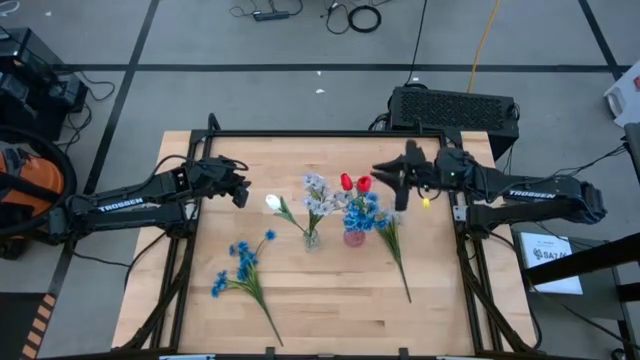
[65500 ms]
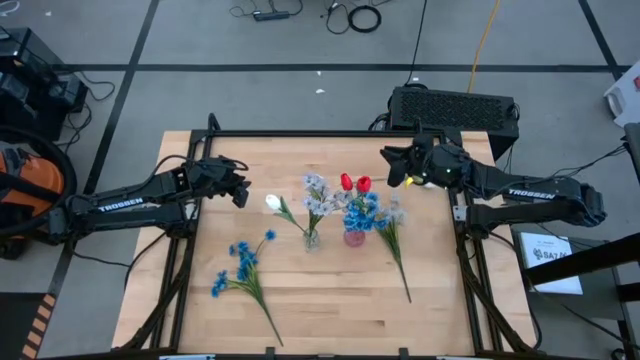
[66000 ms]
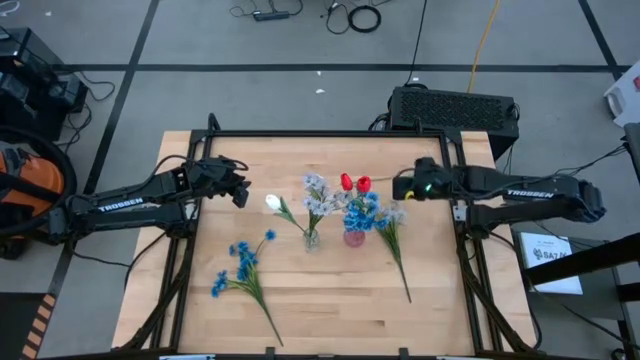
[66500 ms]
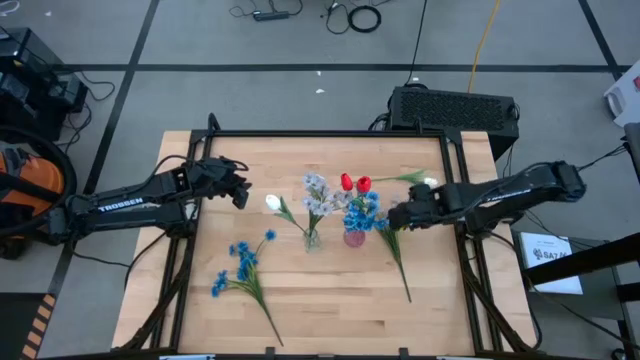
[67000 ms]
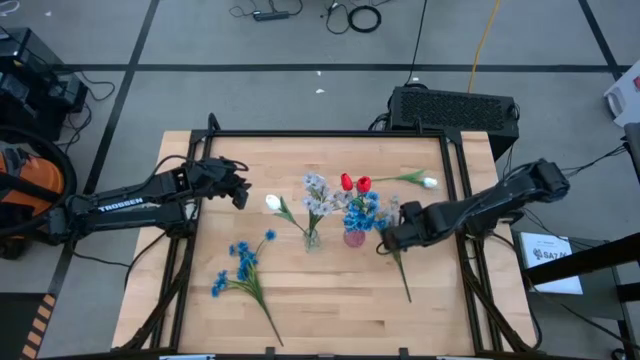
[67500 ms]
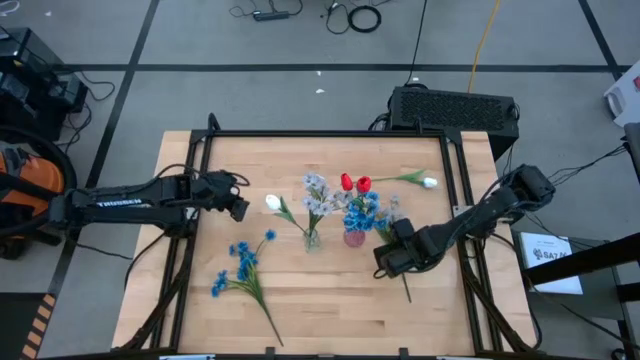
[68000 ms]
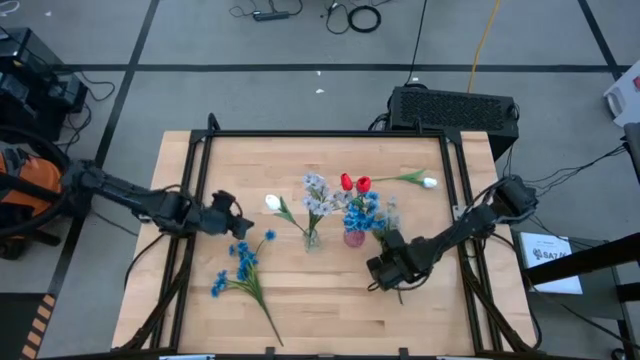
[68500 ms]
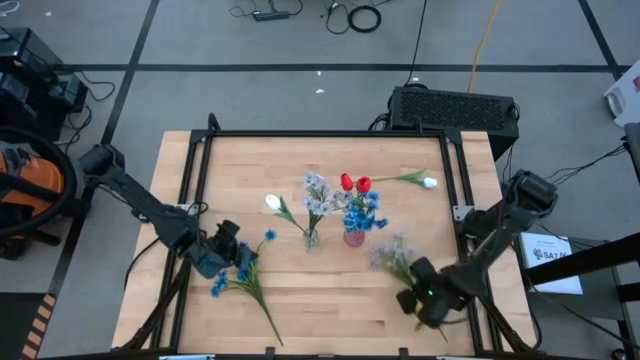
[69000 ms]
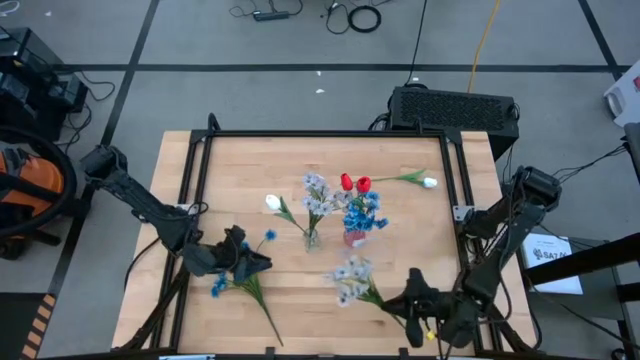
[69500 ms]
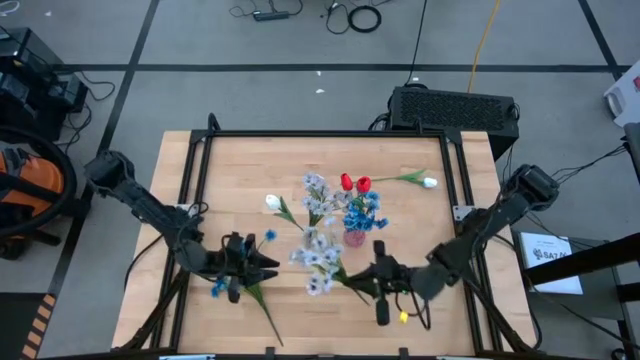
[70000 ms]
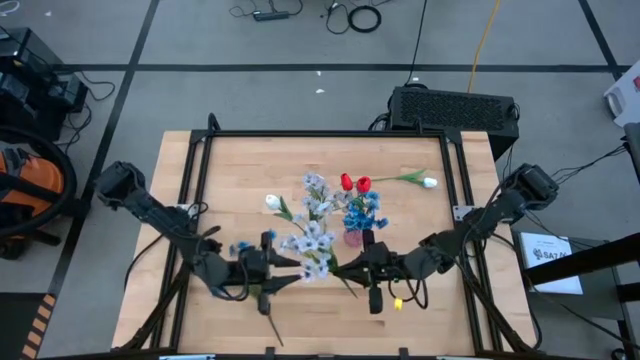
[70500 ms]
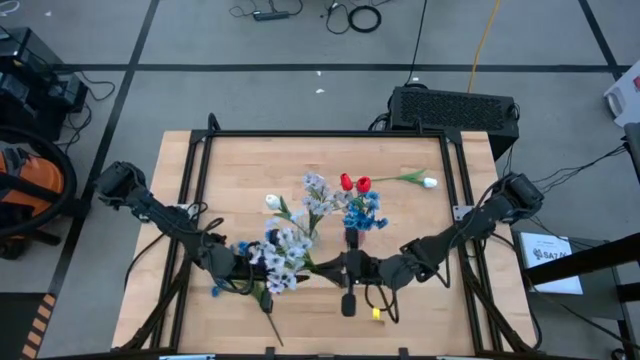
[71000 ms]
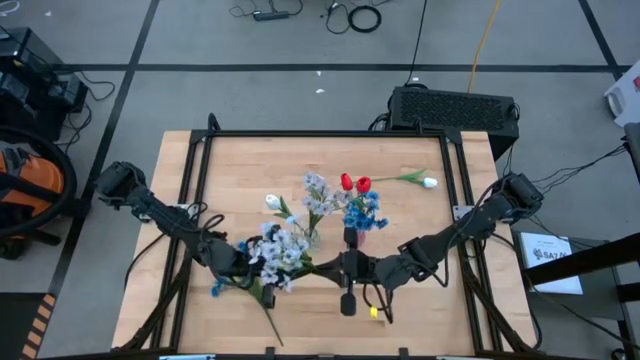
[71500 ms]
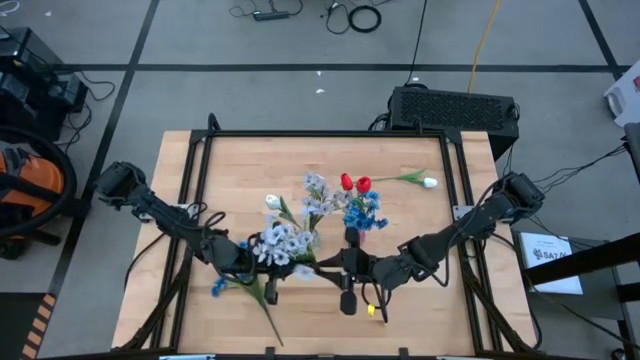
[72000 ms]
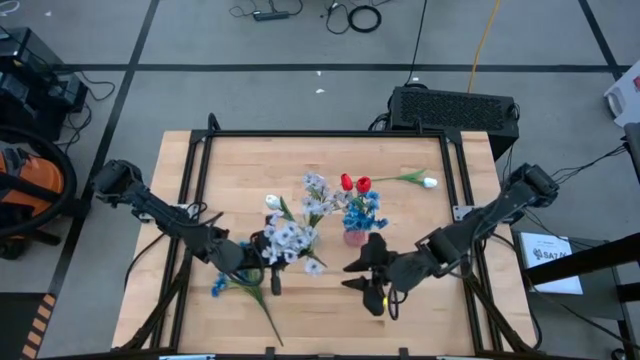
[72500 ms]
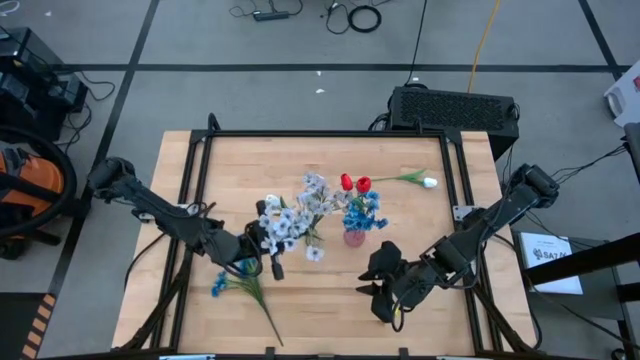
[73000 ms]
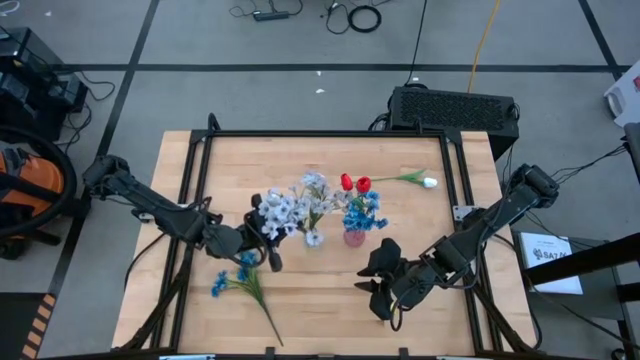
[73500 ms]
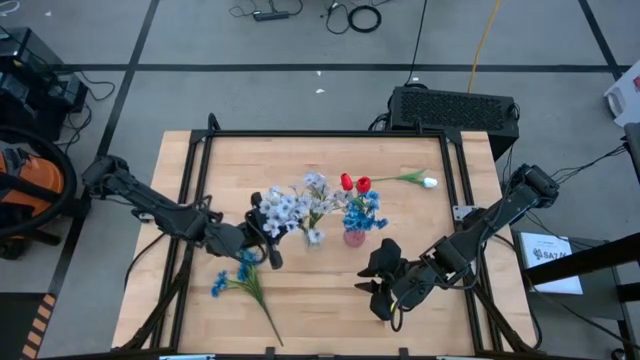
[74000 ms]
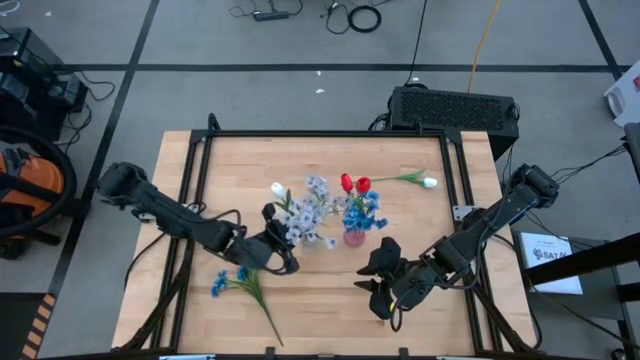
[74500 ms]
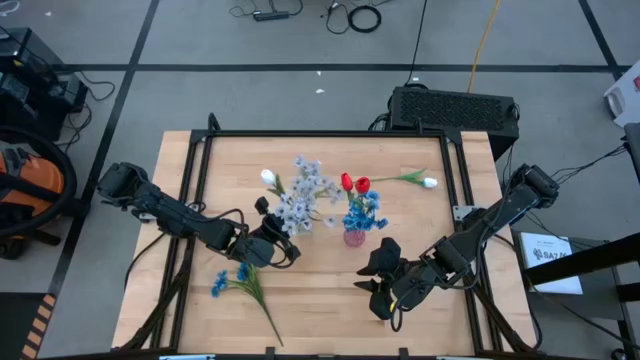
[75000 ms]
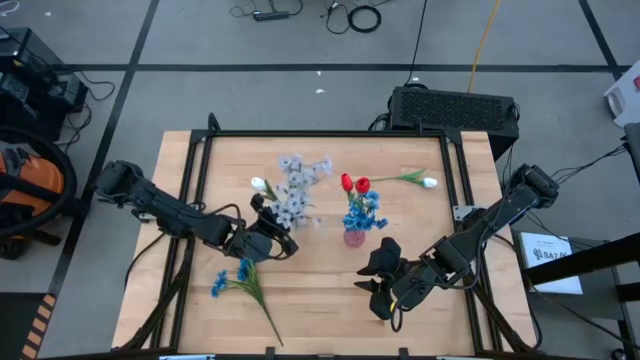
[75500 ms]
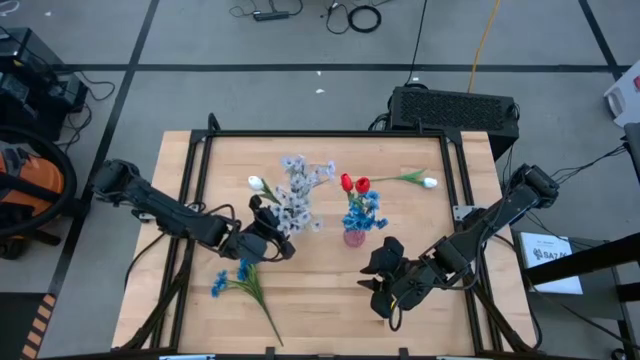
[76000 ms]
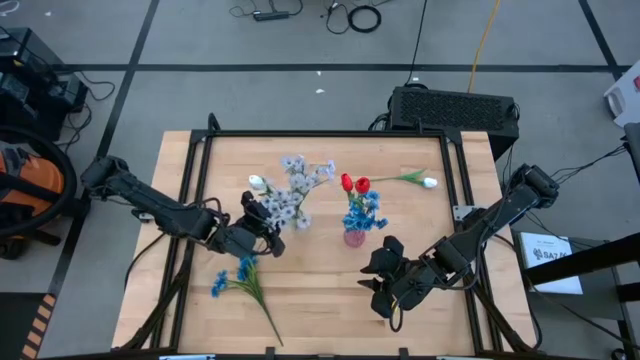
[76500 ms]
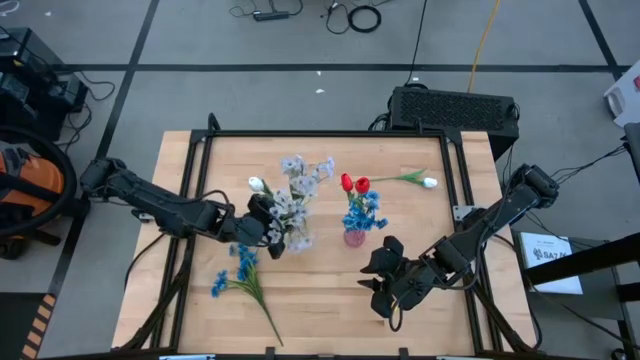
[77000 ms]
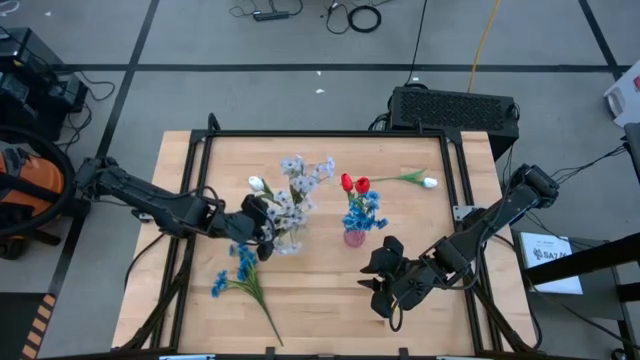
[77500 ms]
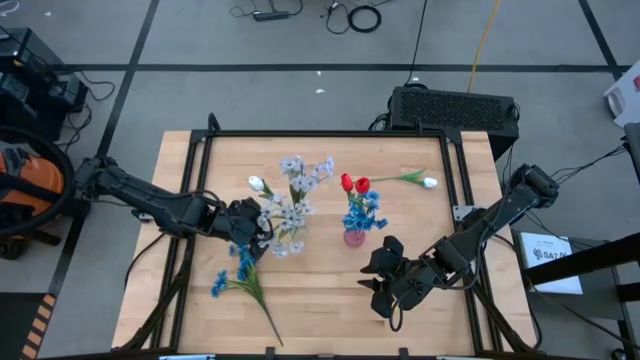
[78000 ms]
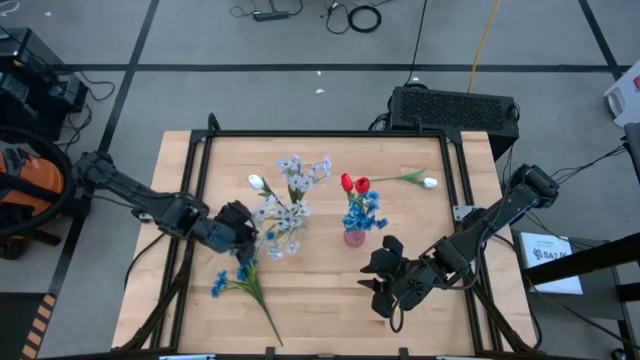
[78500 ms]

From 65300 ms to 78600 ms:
Task: Sort flowers into vase by color
Put the white flowers into the transparent vase

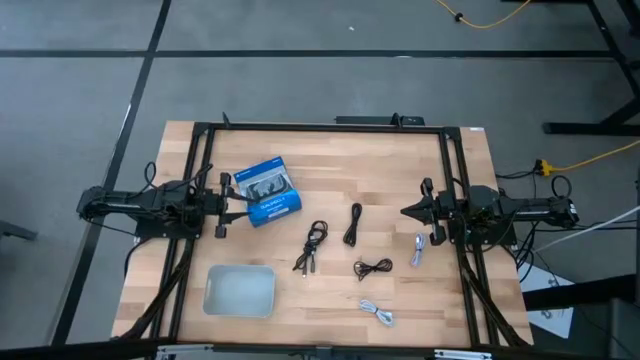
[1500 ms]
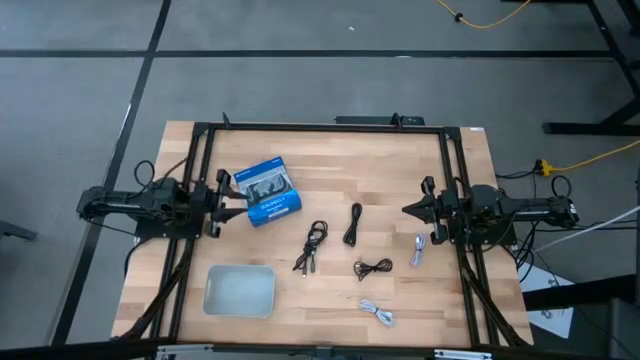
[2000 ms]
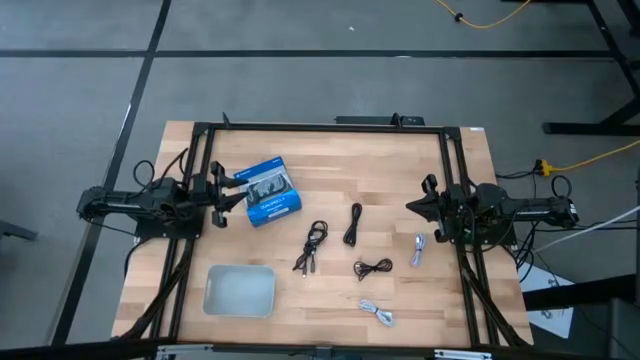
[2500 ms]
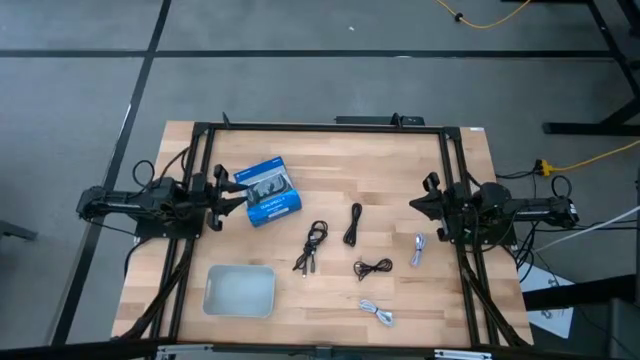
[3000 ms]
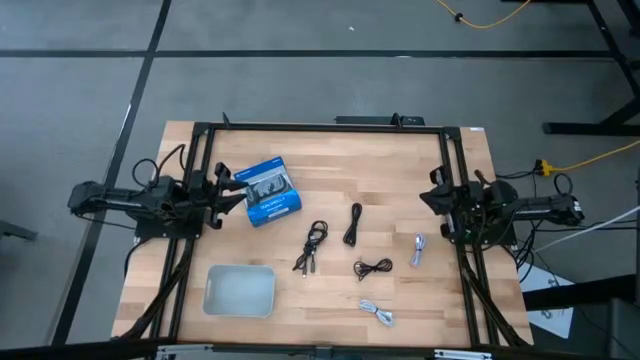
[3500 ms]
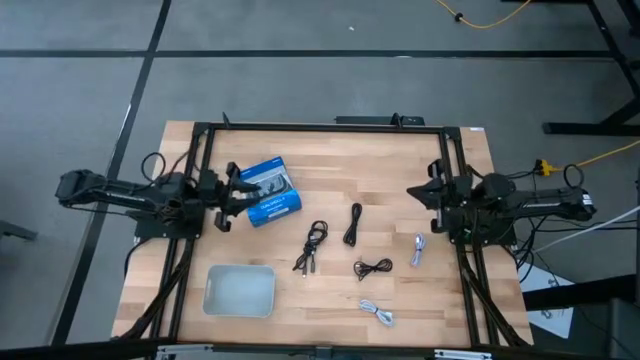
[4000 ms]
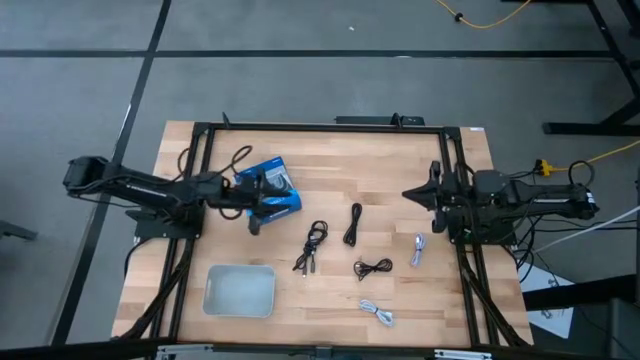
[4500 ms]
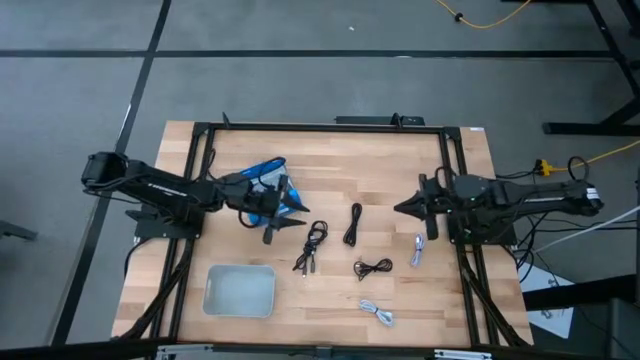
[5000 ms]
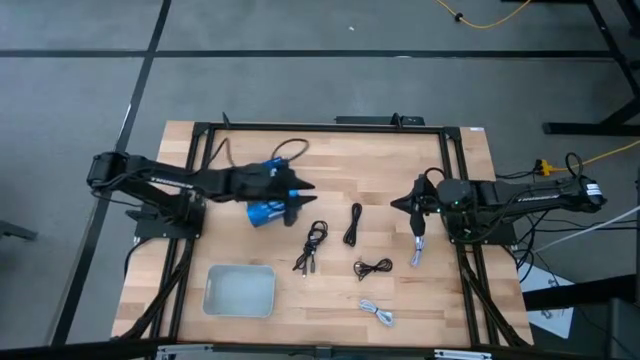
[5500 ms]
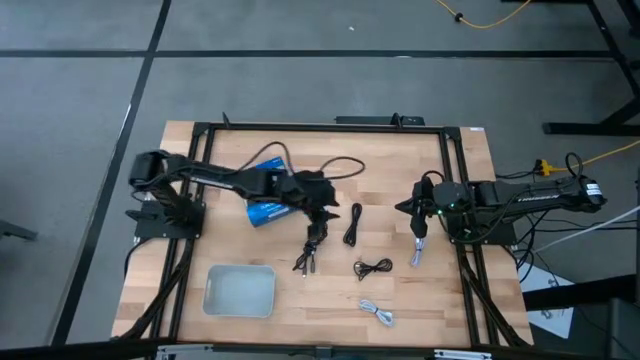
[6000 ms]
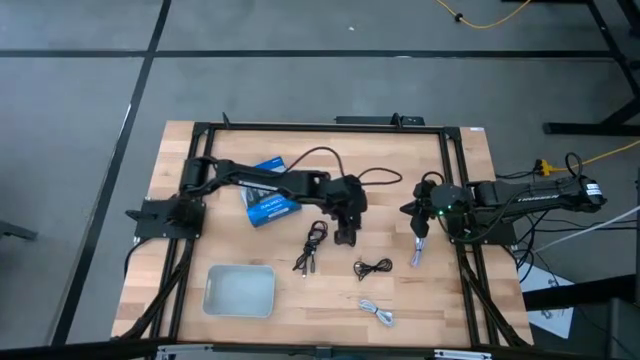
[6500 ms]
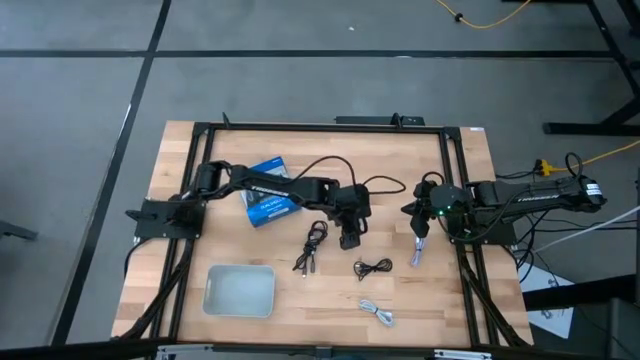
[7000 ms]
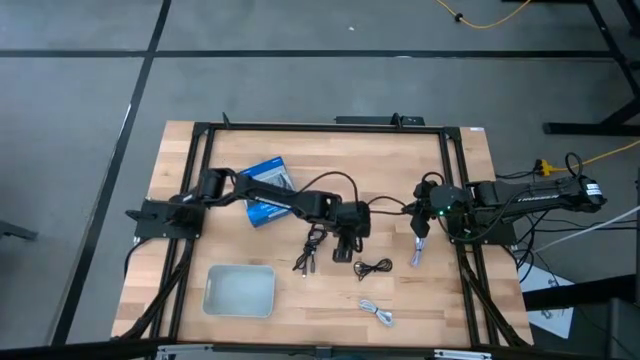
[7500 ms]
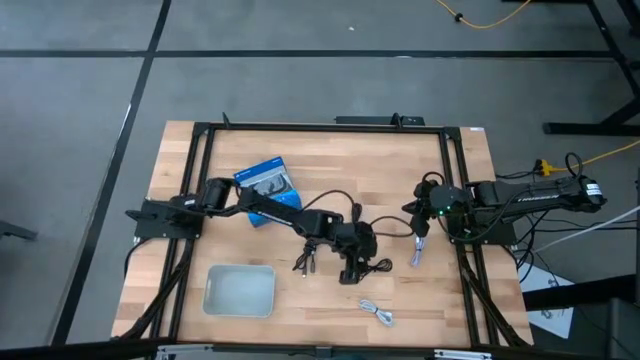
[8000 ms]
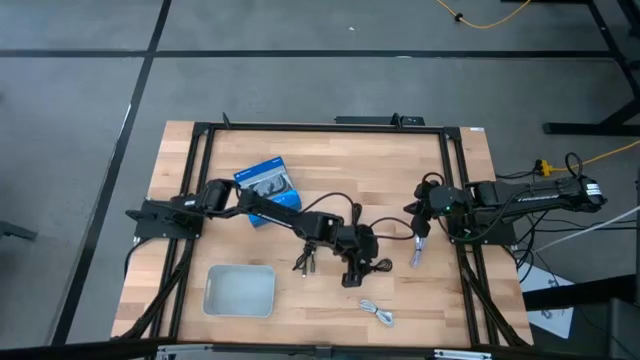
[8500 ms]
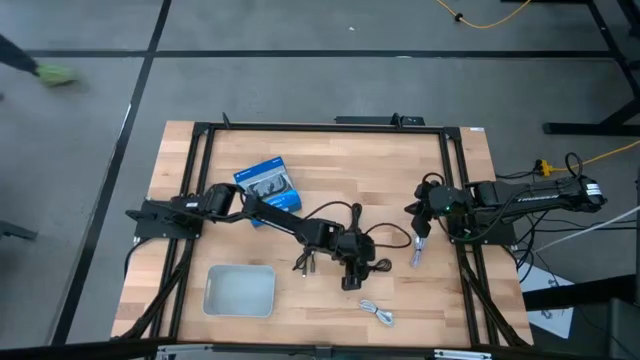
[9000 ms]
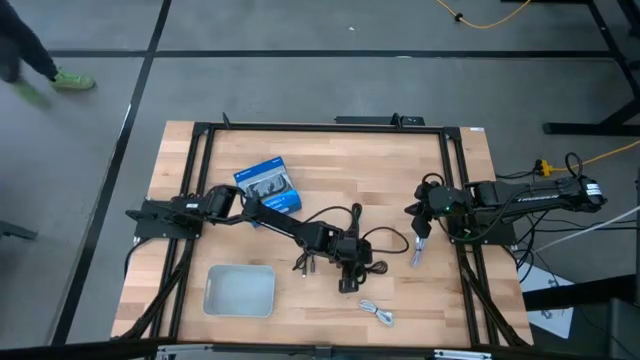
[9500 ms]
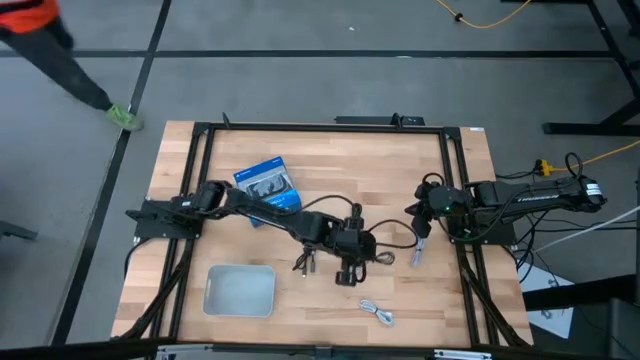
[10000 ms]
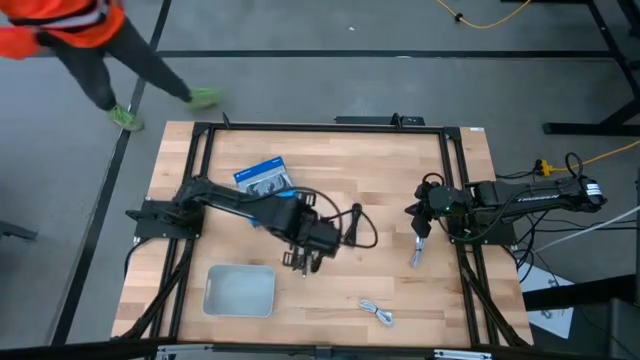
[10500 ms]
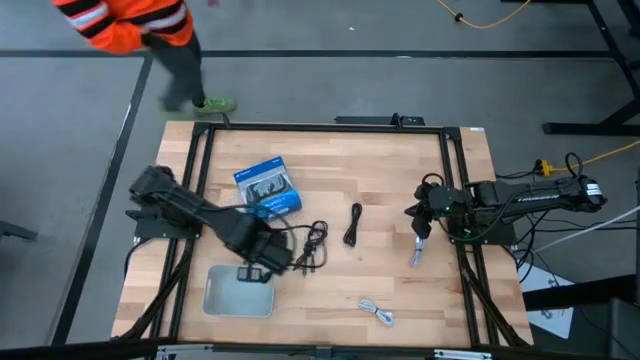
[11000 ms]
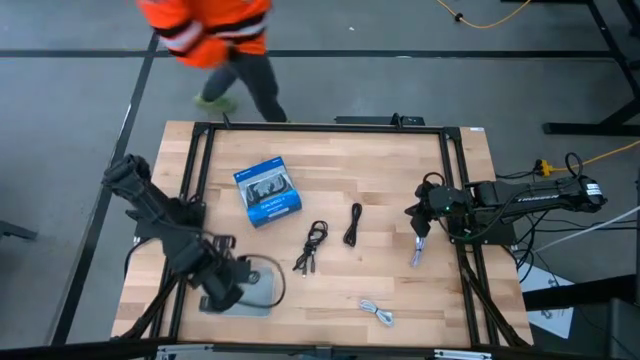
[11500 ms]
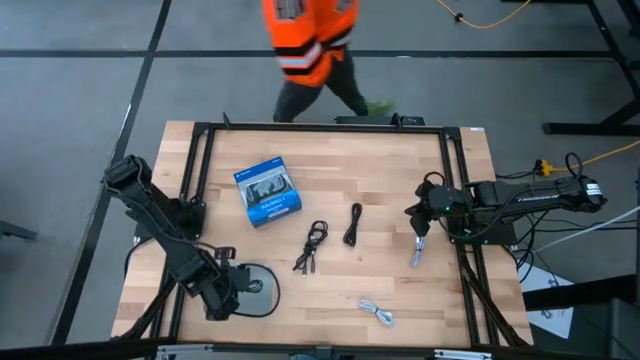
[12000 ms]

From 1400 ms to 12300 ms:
Task: Pick and place USB-C Cables
Put the bottom right black usb cable into the white bin
